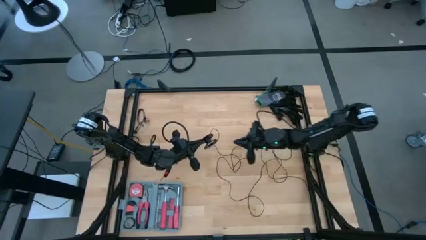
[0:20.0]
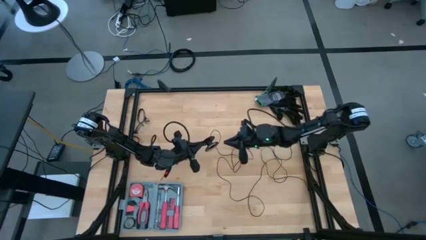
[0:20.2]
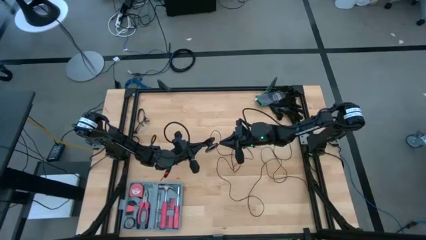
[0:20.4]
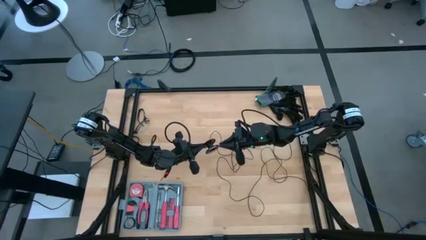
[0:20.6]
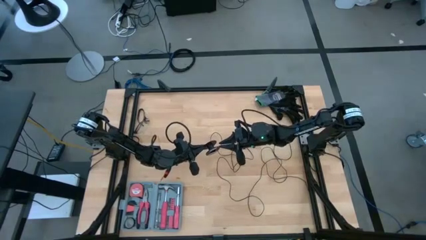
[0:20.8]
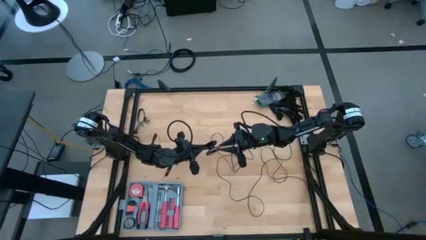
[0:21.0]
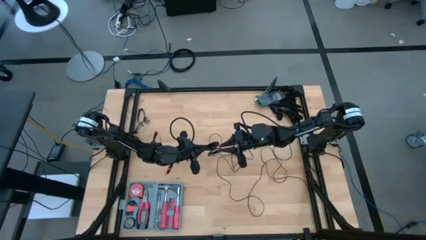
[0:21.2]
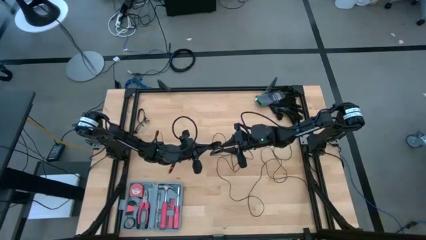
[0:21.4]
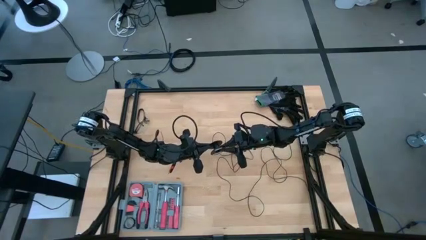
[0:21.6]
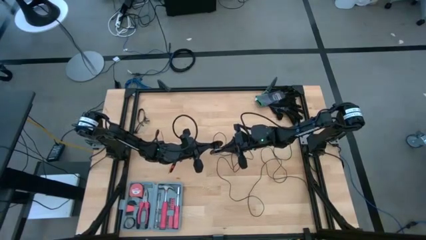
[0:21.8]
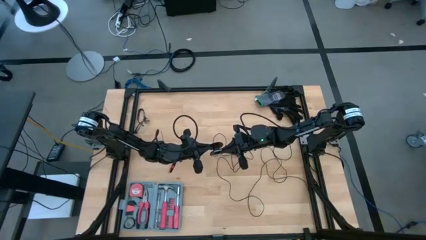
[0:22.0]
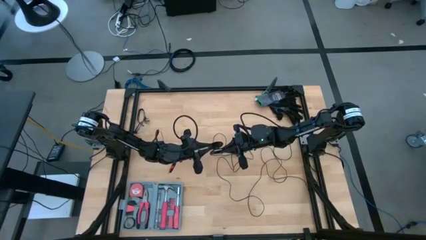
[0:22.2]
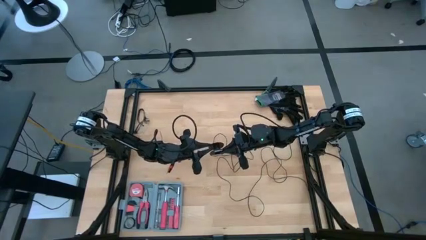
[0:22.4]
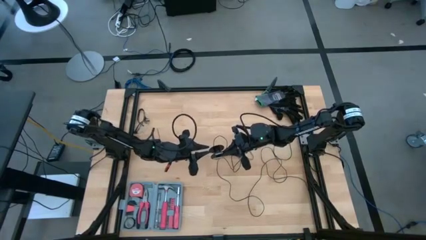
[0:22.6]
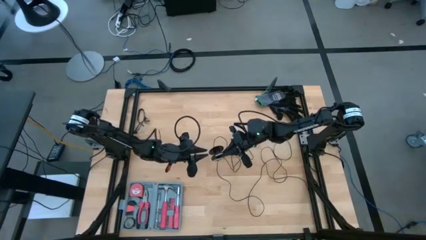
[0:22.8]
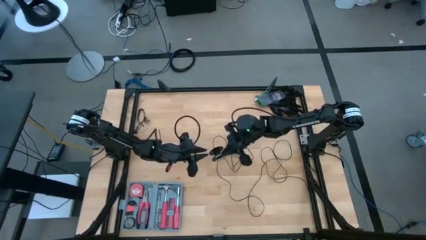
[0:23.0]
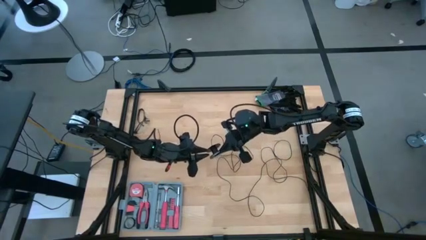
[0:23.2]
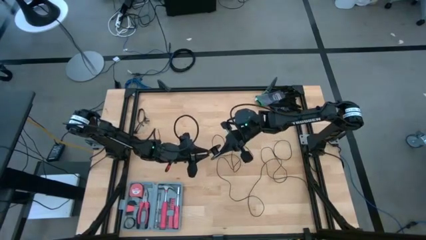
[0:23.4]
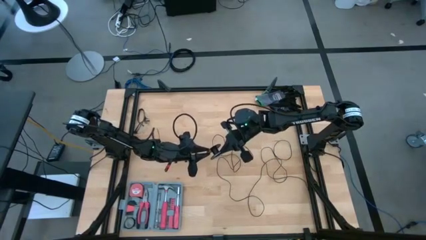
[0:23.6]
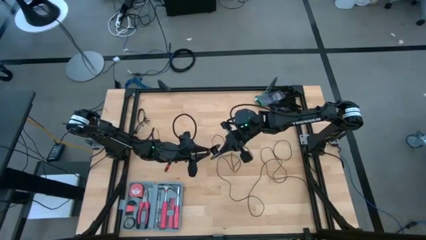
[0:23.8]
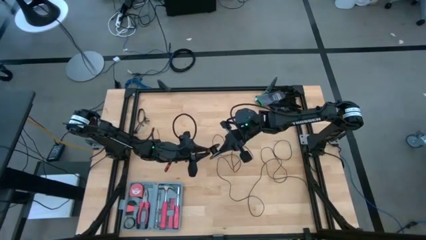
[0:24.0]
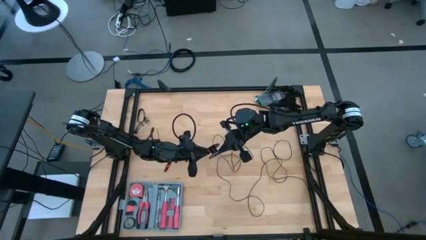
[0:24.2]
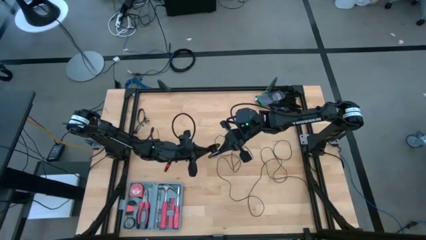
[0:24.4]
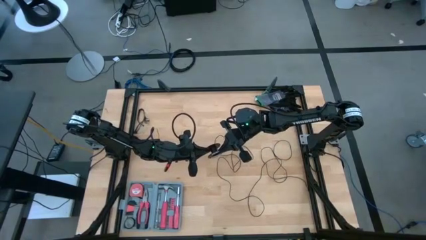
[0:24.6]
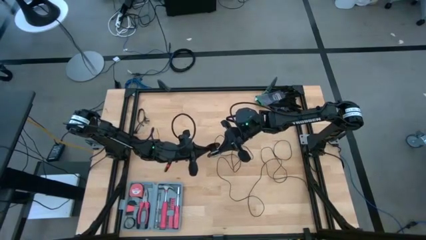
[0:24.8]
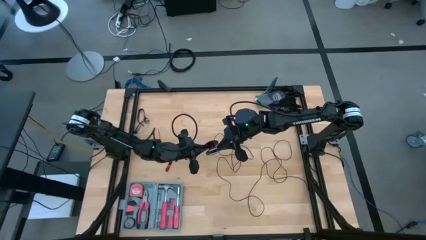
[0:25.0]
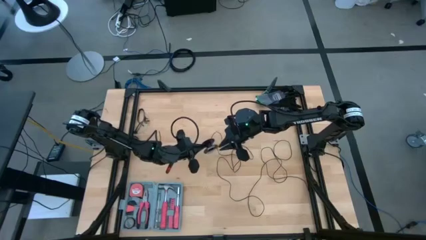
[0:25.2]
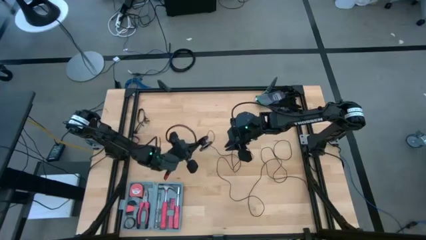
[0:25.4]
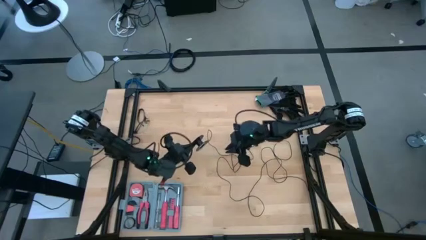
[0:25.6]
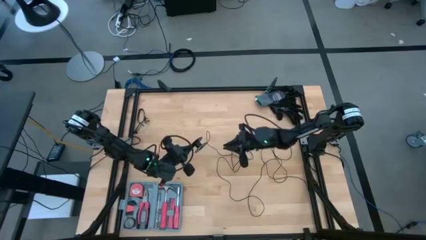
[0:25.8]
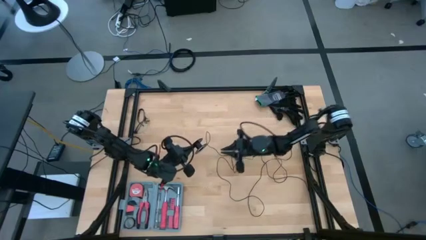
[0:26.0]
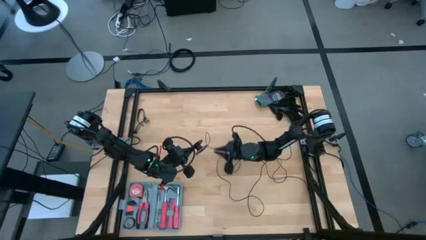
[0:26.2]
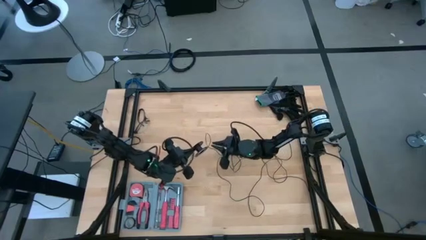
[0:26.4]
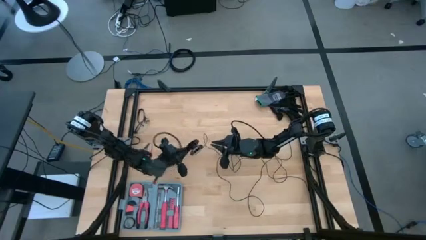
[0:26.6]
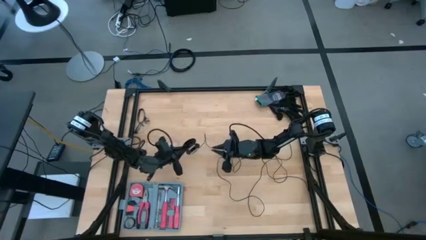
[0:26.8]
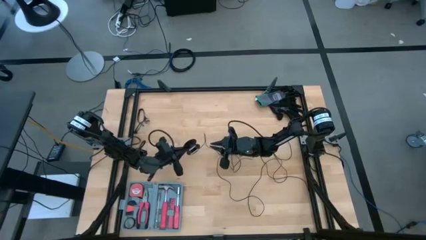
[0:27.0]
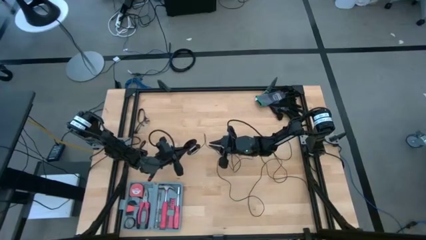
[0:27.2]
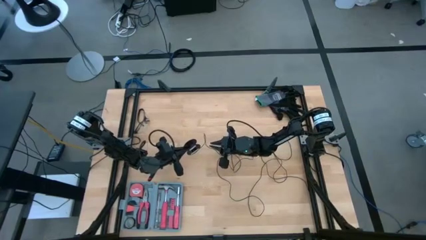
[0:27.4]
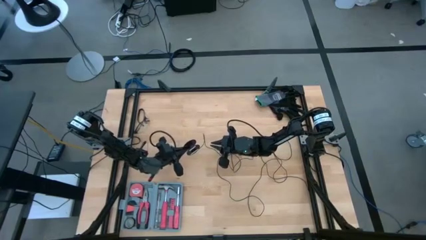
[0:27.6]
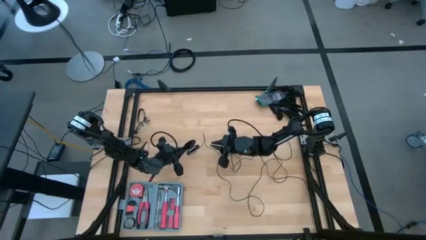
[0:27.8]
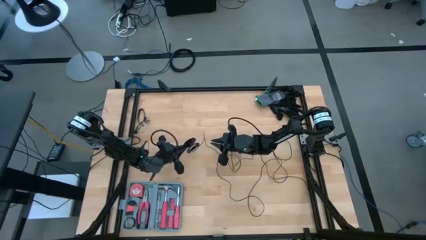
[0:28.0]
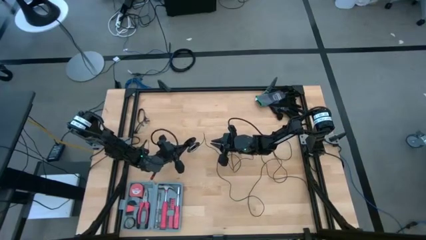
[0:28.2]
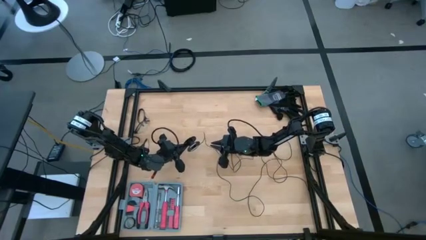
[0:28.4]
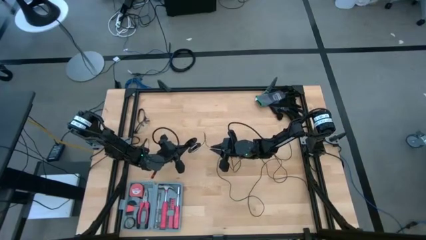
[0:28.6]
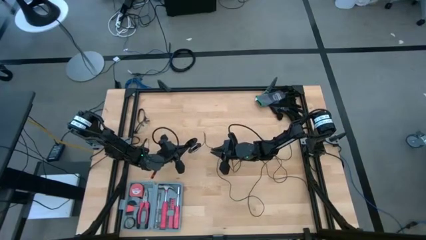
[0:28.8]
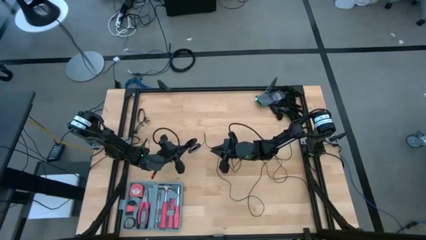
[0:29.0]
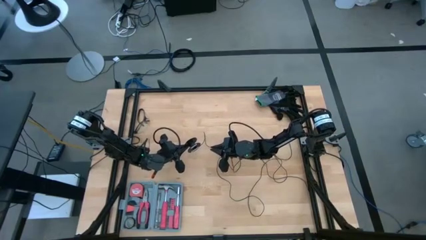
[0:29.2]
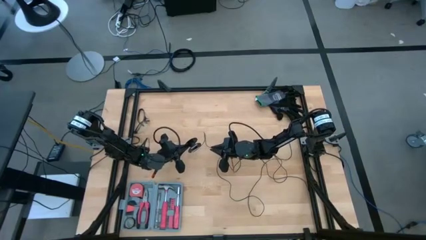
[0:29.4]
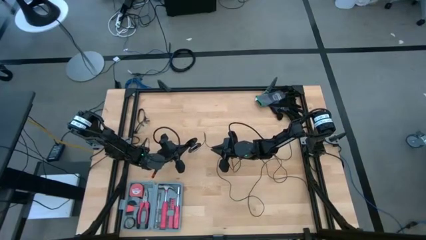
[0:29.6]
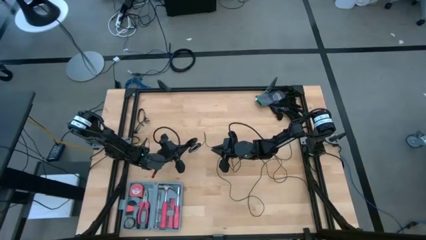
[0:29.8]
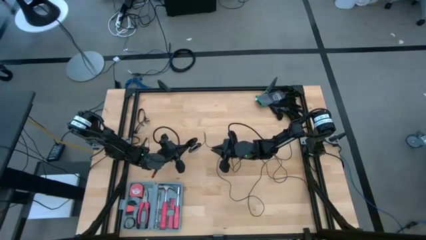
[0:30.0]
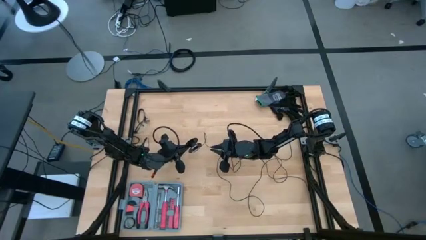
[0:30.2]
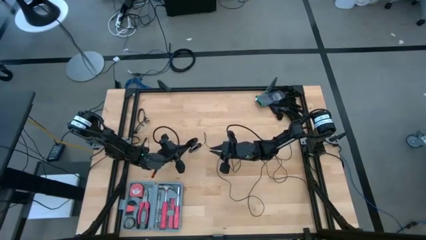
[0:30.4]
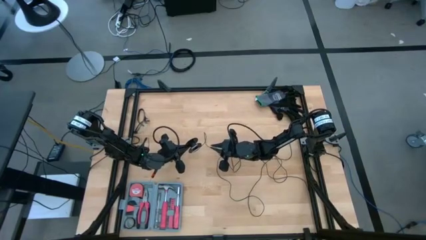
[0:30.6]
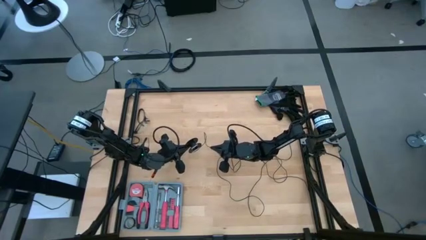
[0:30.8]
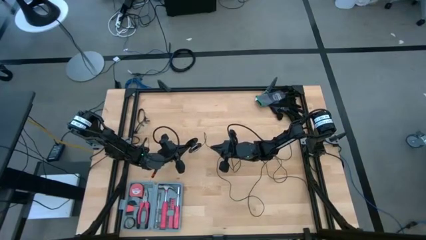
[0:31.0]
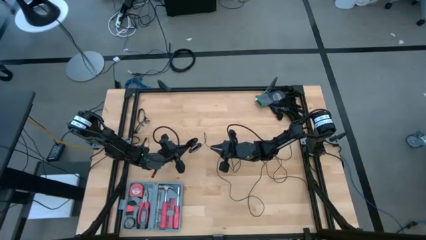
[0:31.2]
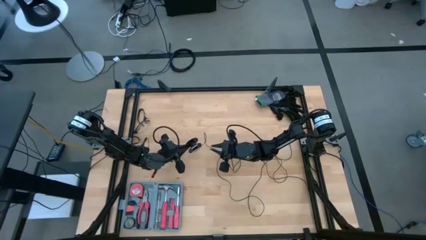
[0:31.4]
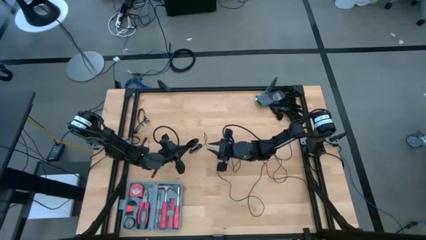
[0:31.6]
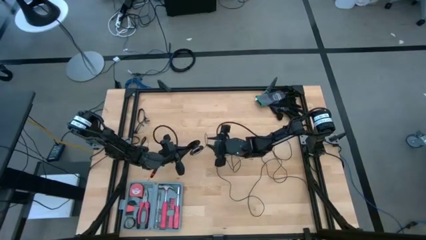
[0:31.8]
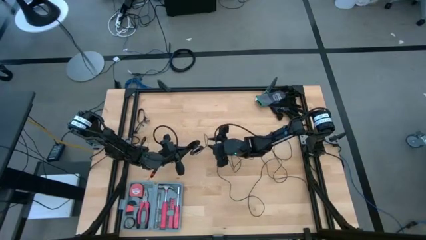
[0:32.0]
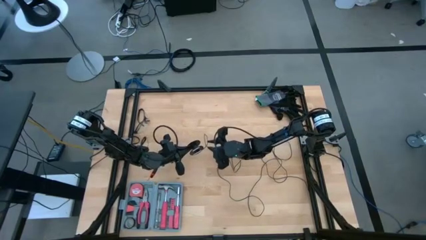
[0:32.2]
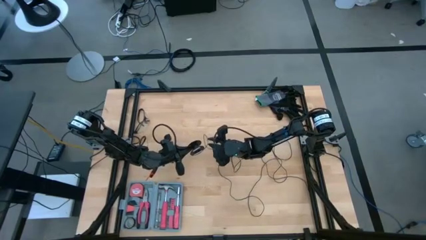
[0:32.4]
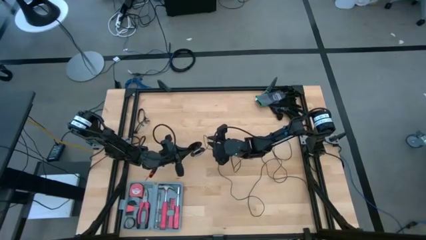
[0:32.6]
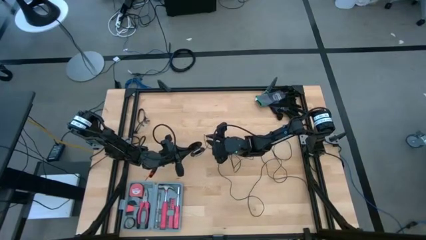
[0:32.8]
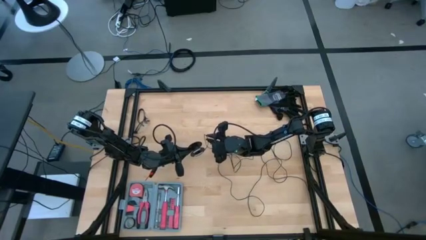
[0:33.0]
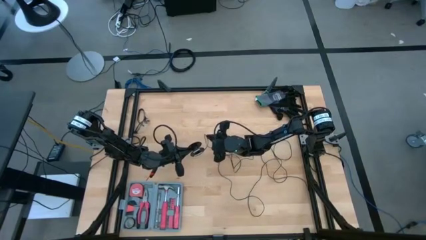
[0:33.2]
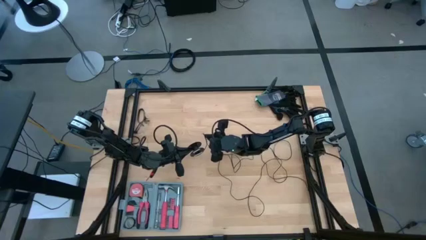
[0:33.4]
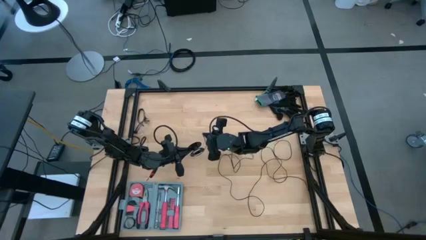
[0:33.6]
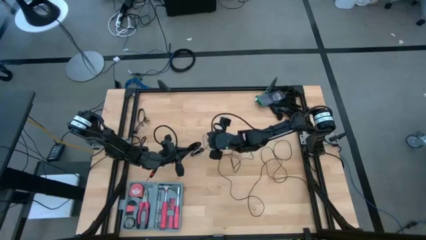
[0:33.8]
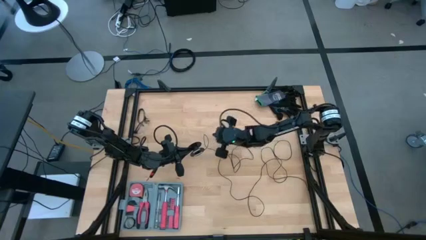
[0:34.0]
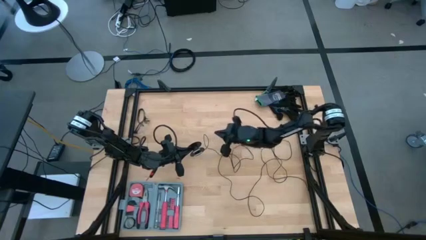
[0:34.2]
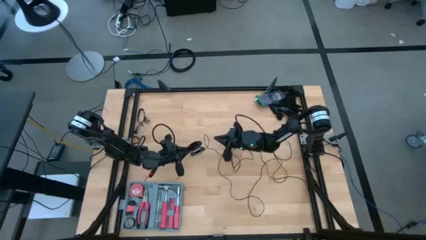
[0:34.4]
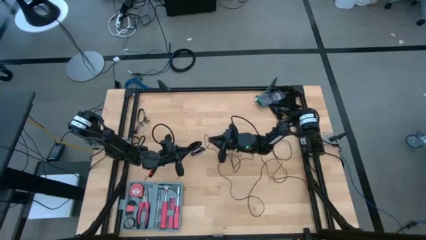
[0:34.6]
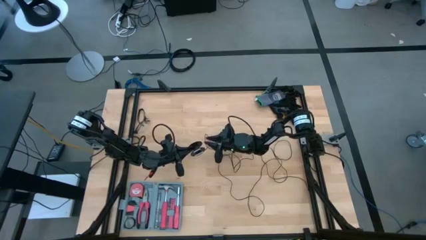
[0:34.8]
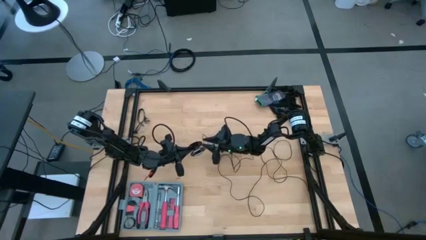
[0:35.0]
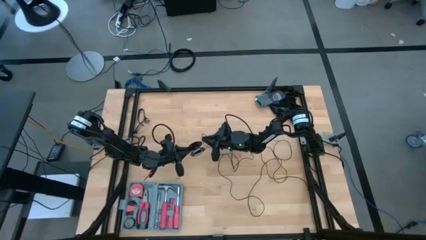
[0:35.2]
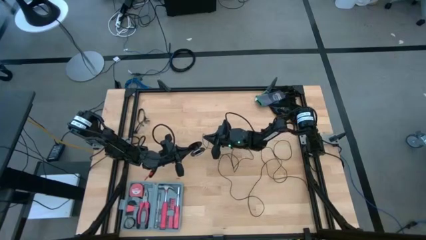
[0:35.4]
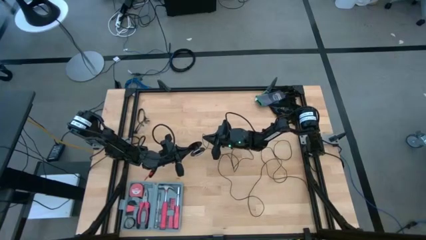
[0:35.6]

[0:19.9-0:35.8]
Task: Coil cords
Coil the black wire onto the spool
